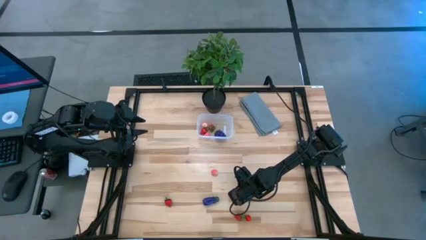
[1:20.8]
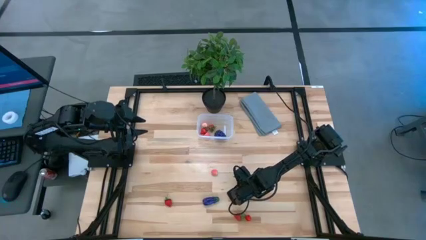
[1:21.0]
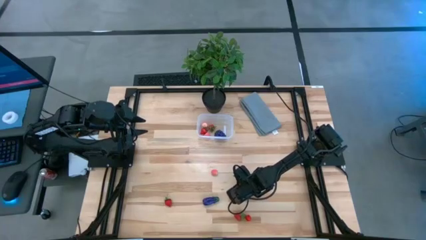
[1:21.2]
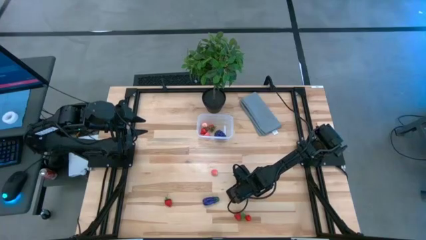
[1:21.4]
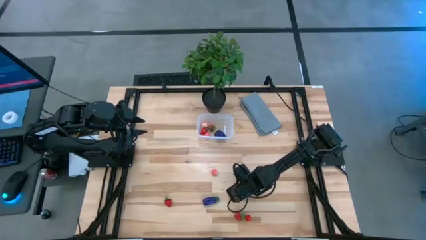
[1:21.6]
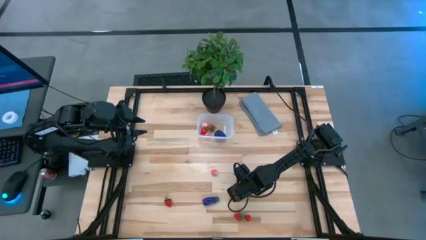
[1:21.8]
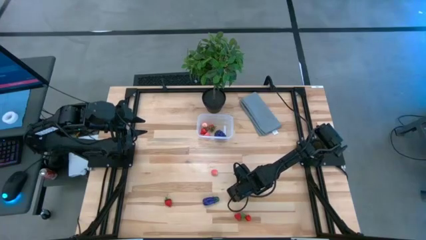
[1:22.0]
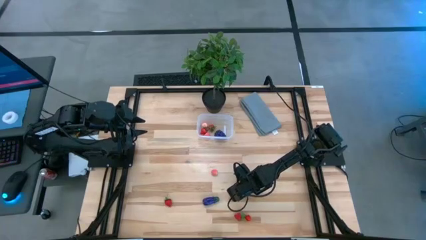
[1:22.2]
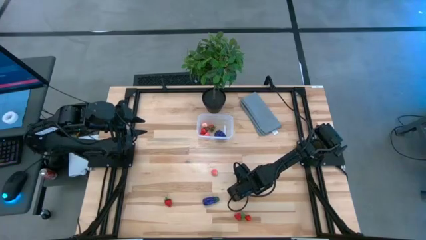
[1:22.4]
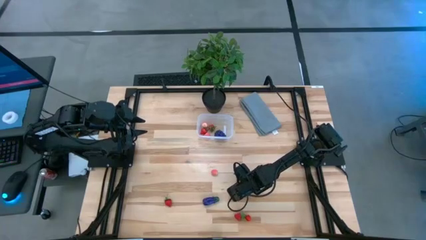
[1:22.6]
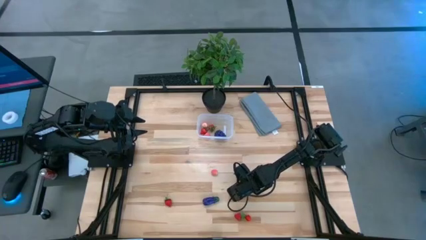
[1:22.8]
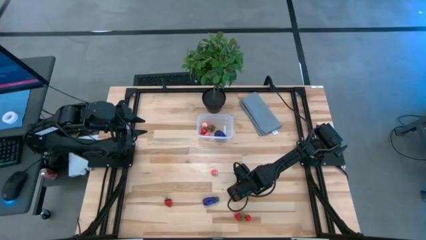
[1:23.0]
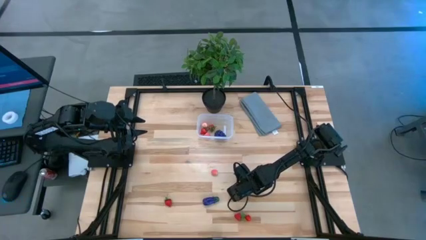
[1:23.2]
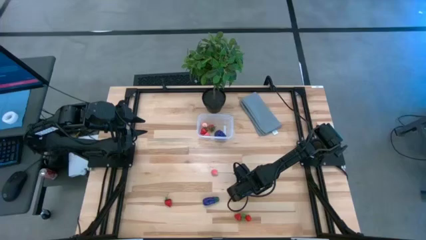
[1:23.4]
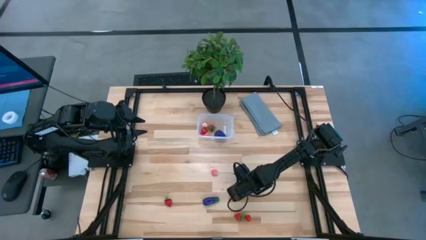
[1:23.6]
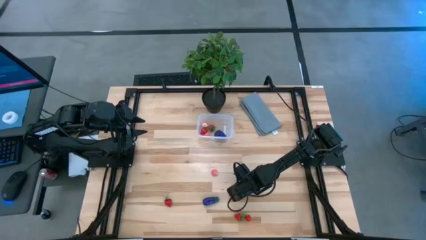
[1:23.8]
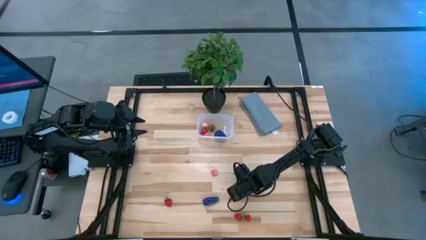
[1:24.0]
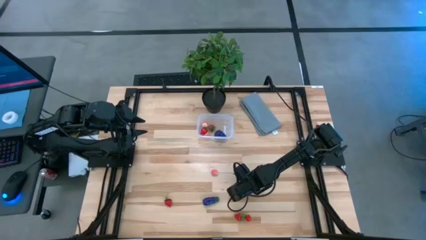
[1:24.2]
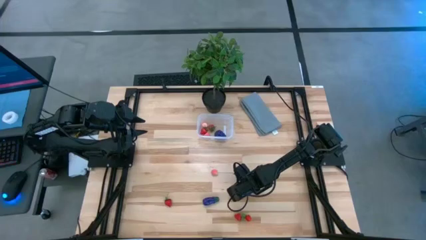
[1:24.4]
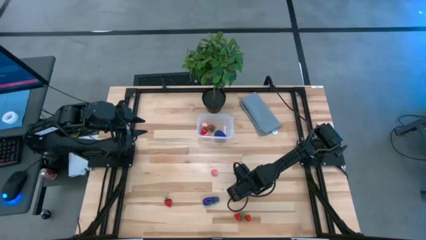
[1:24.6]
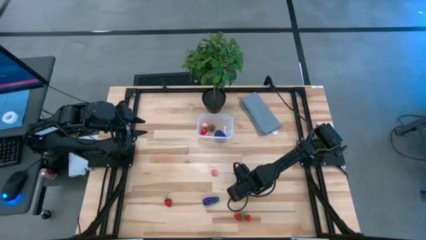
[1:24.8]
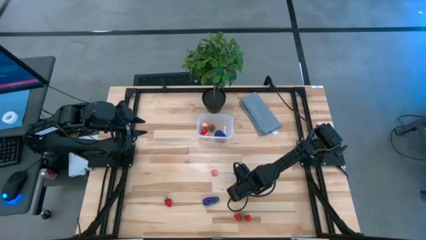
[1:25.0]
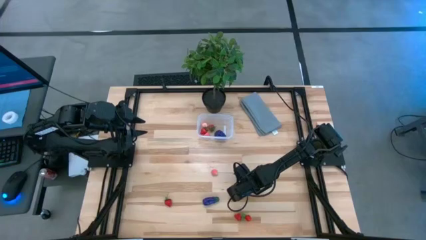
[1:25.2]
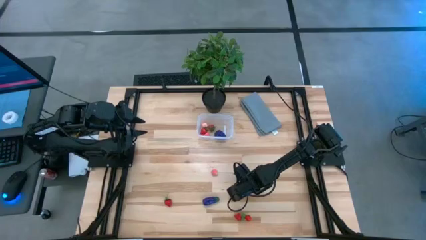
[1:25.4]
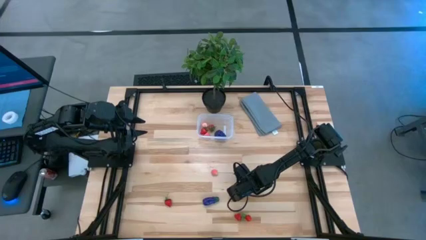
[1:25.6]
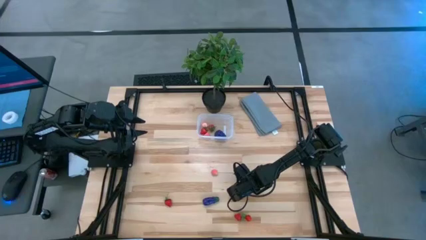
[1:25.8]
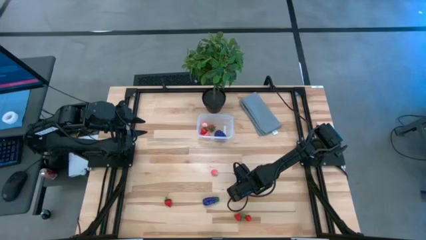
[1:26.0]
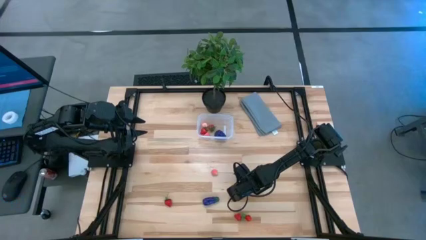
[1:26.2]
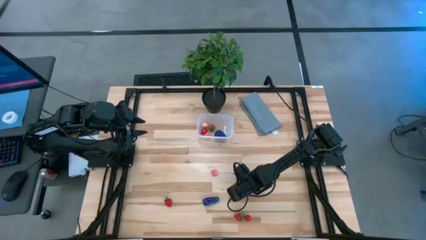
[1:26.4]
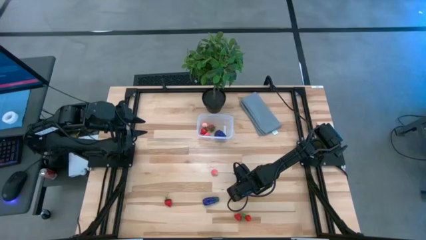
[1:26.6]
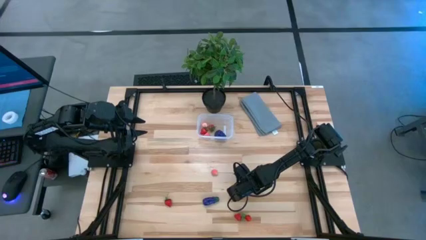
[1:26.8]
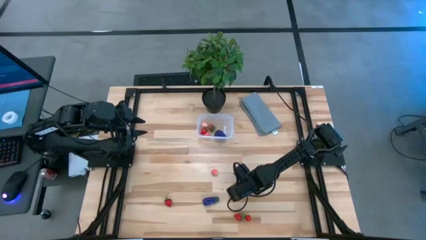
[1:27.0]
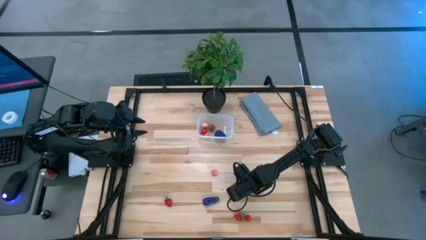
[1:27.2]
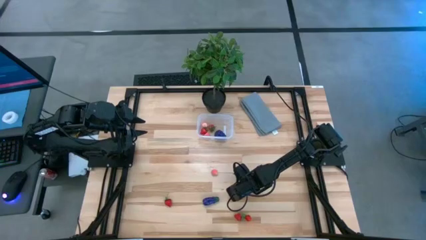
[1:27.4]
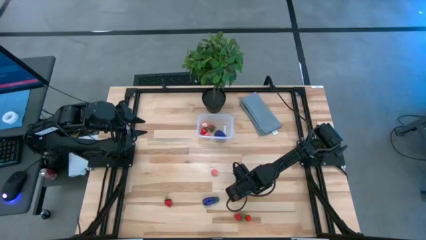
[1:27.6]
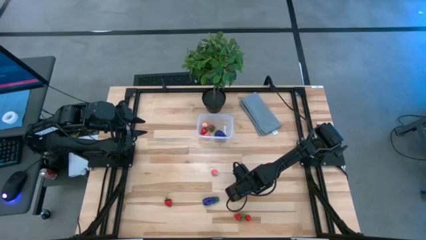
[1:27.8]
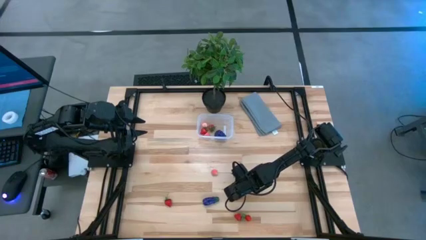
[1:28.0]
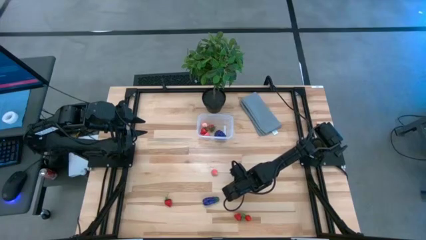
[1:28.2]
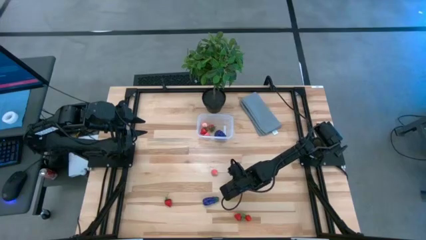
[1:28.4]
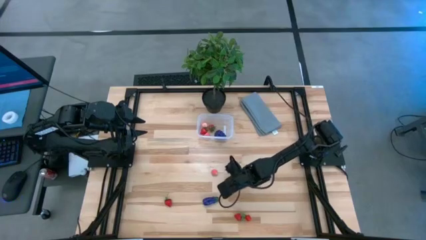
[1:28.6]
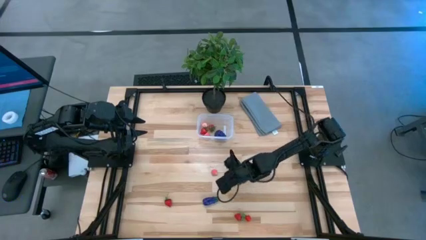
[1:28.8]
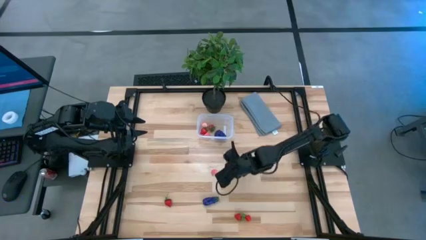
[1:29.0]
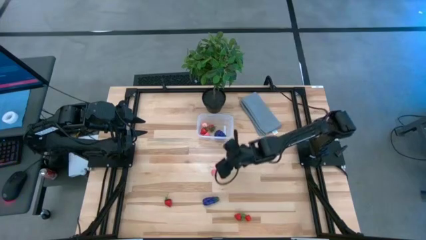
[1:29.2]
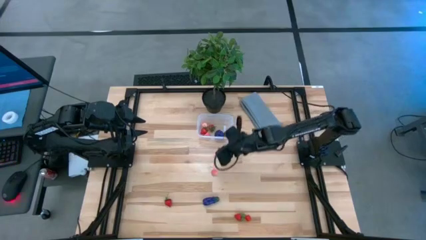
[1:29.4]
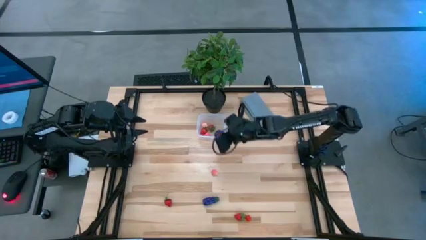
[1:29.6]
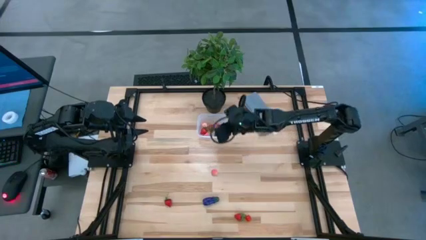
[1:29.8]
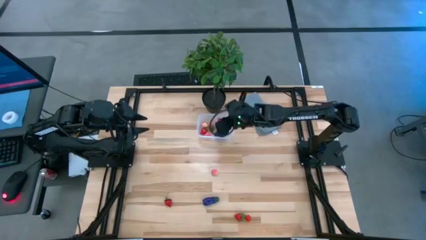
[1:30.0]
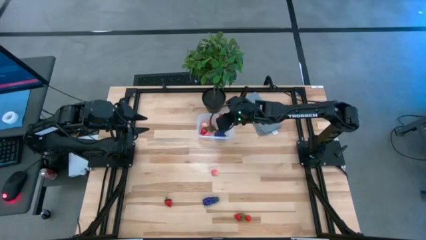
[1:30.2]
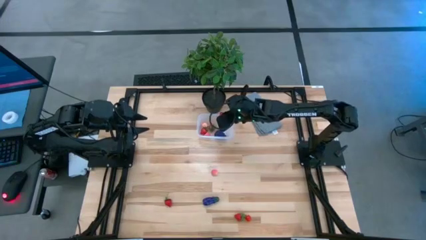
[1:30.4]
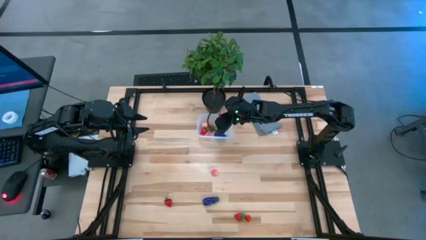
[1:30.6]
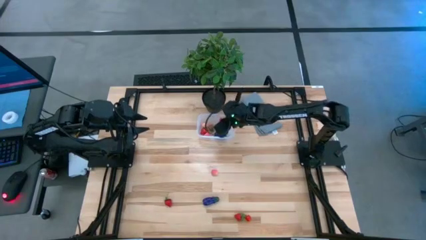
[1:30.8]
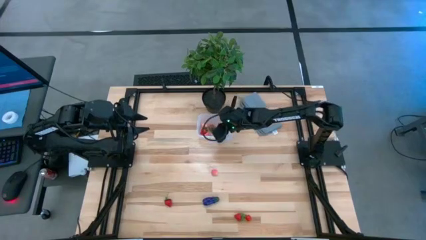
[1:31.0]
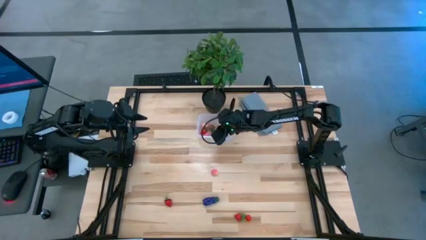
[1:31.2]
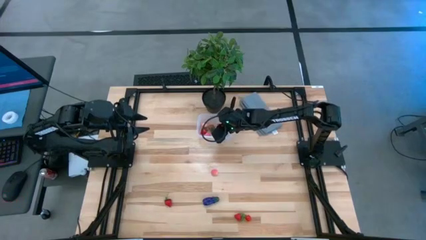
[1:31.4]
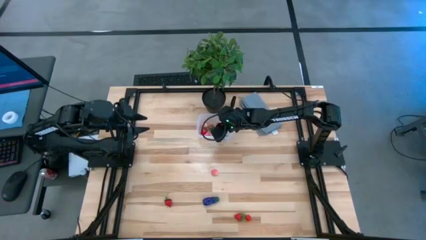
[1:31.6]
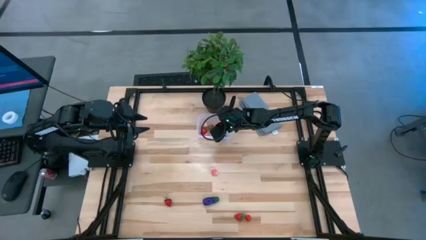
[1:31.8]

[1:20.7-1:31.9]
Task: Pick and placing Produce into tupperware
Put the top right red strawberry into the transparent bin
